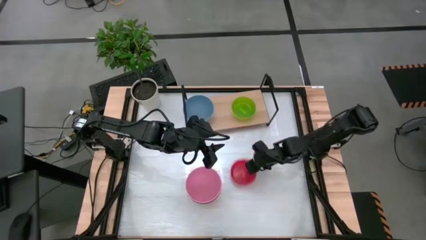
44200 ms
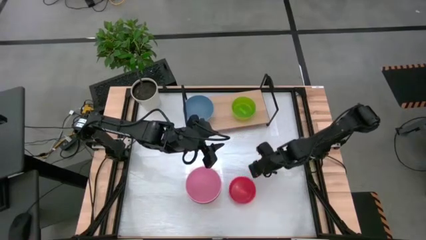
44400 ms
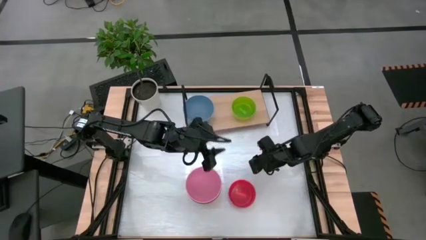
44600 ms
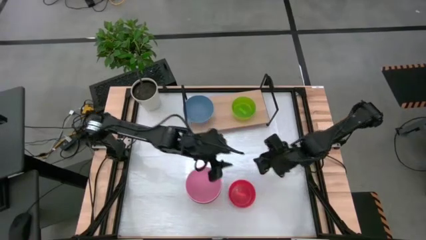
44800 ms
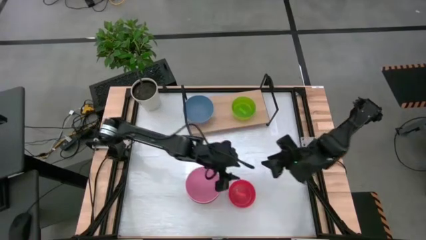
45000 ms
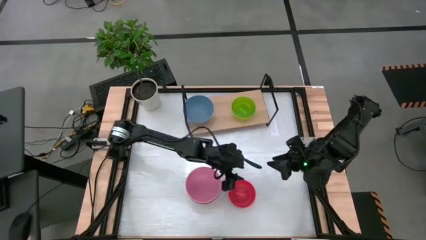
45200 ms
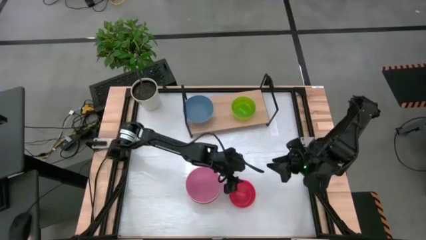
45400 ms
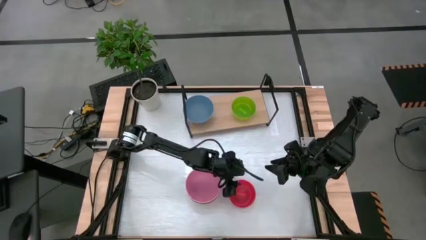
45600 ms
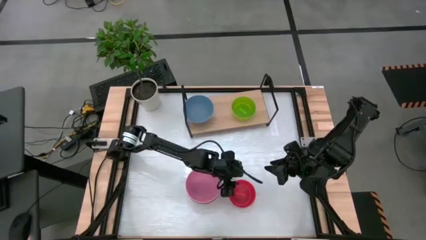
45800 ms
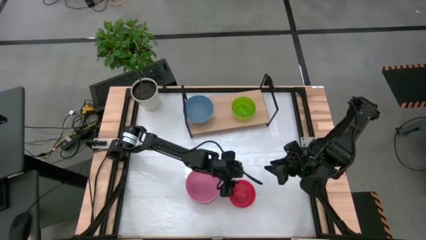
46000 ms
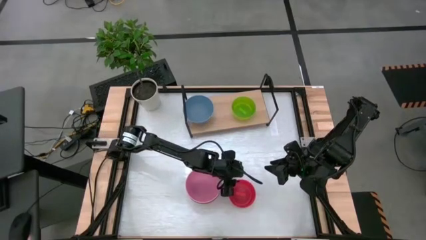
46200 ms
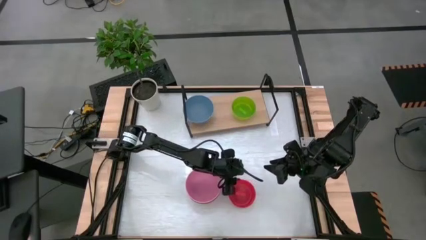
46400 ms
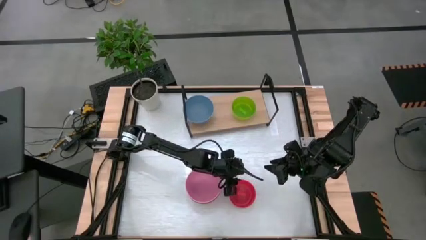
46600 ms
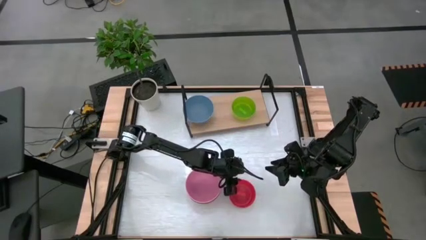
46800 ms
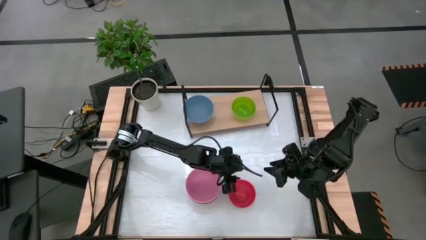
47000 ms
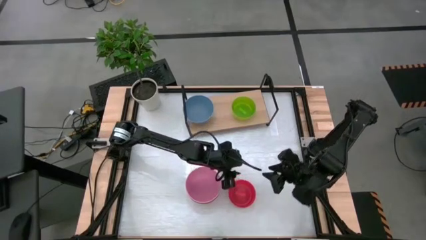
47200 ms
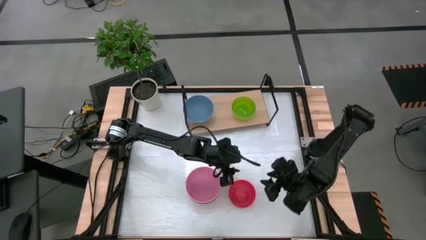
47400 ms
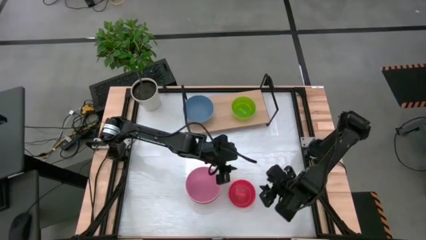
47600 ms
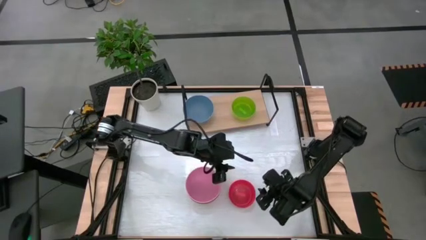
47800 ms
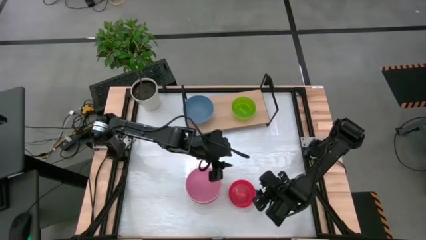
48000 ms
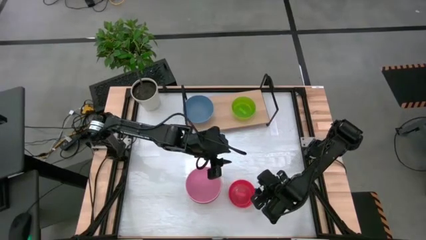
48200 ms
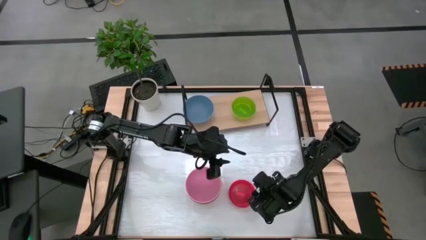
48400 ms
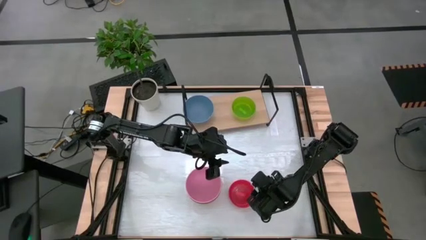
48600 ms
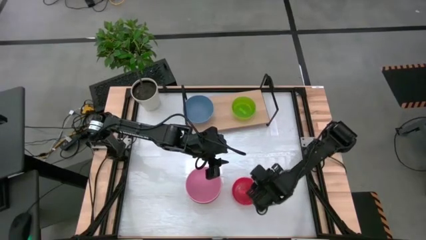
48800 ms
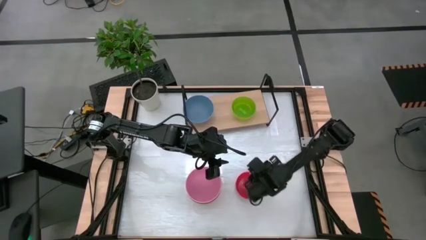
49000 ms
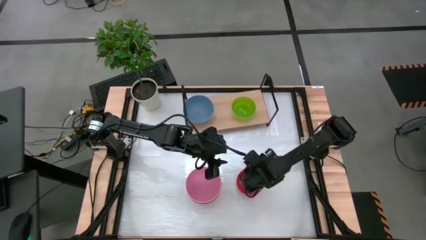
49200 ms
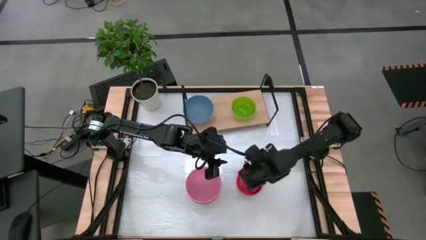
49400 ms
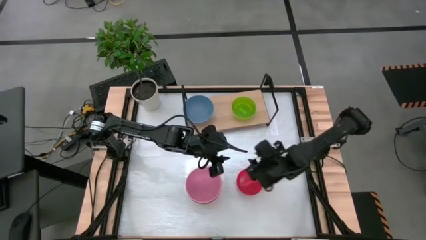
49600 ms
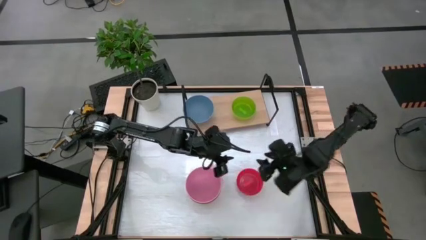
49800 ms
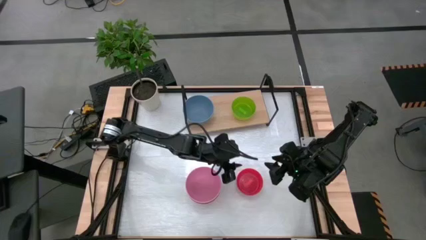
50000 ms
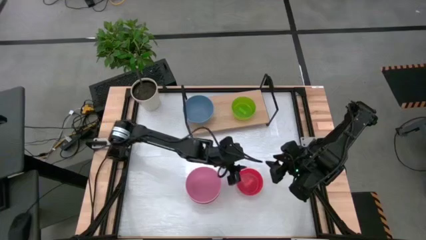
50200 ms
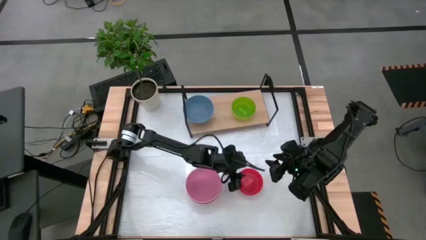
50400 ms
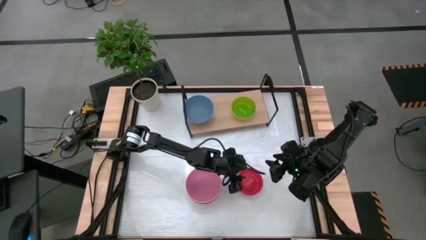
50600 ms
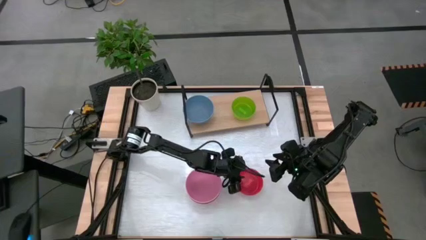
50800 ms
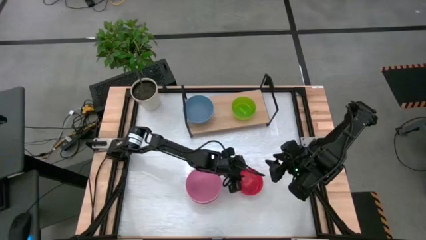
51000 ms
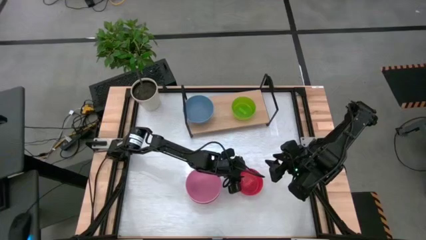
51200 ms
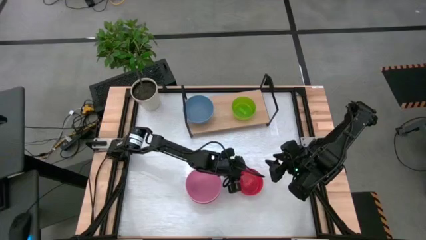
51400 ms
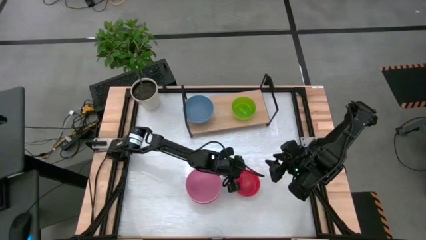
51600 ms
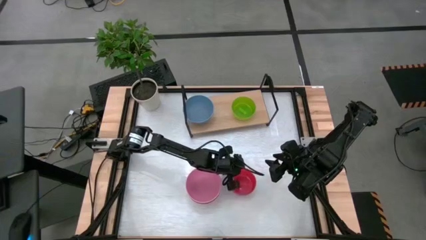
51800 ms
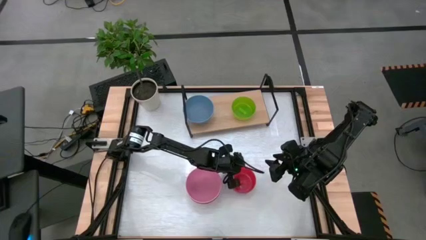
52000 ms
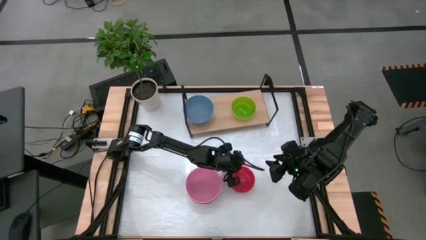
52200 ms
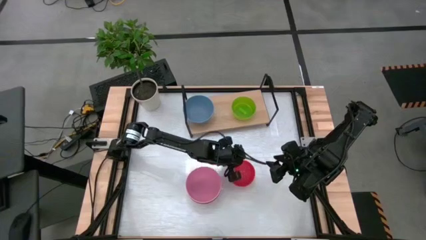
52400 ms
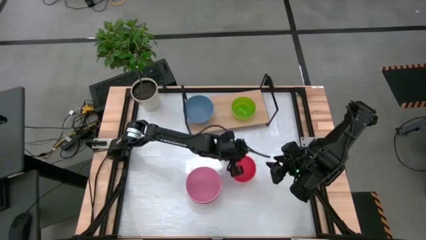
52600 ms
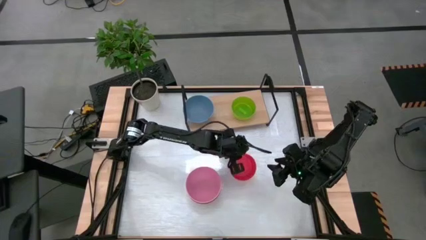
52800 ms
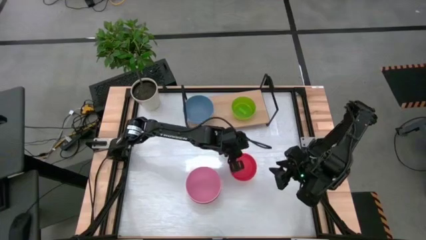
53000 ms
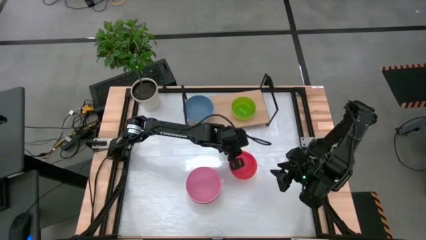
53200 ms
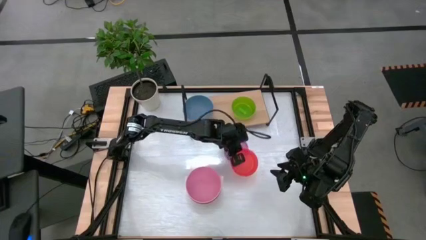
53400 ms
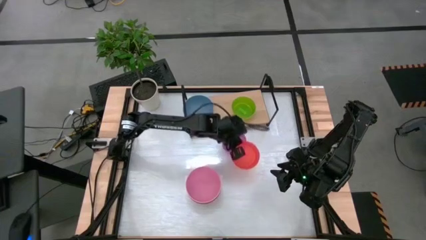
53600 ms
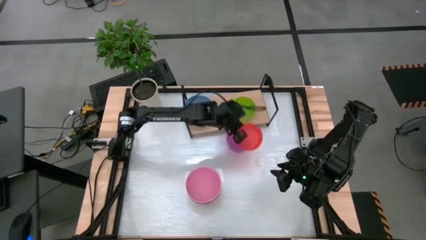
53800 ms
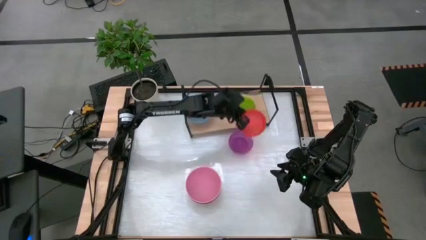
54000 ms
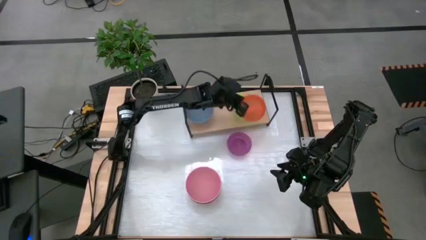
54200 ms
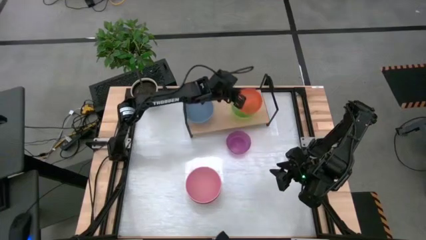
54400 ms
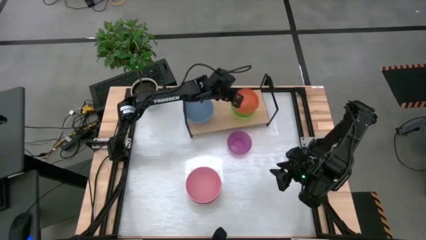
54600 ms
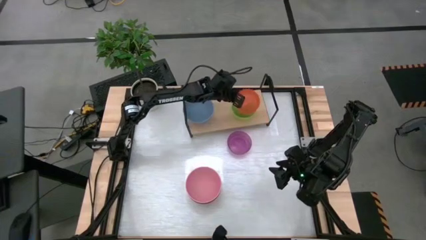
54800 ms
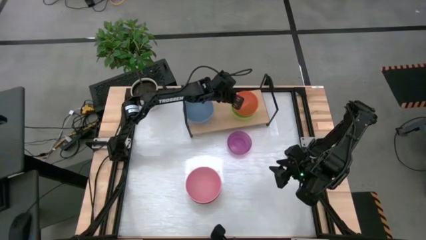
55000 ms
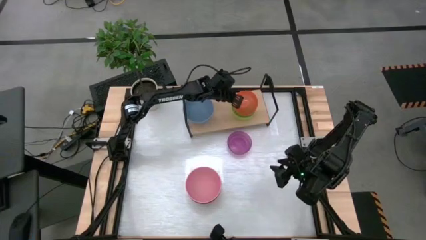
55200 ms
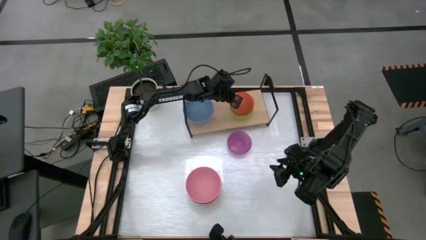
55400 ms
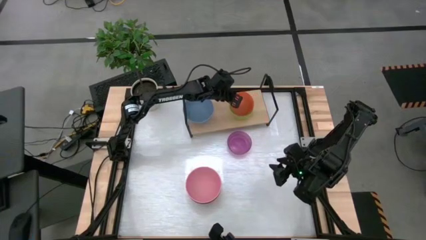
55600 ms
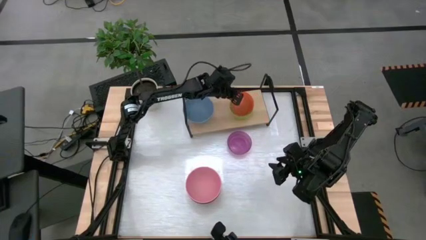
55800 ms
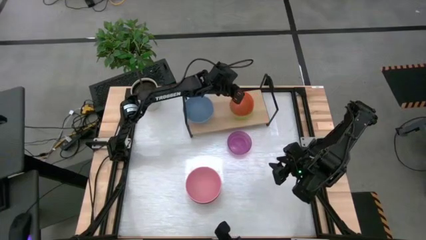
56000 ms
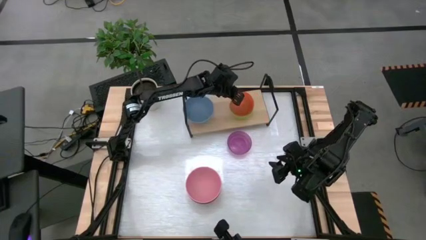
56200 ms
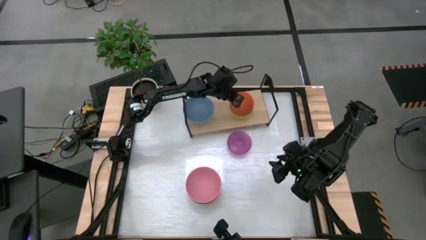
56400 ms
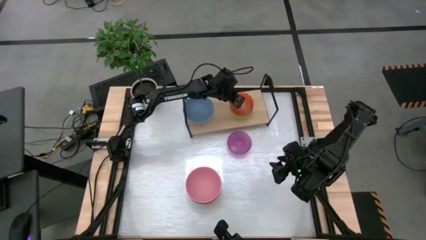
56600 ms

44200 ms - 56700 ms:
Task: Place and stack bowls onto a shelf
Stack the small orange bowl on top of the small green bowl on the shelf

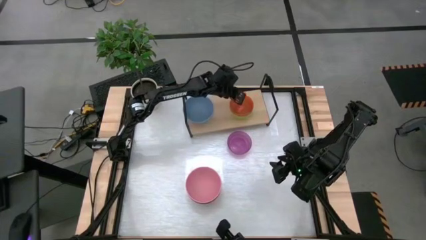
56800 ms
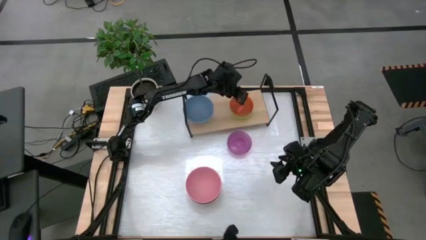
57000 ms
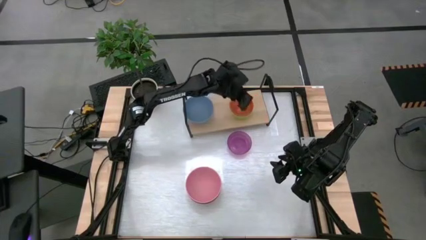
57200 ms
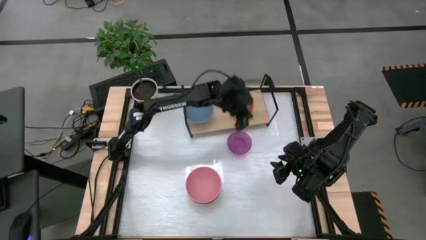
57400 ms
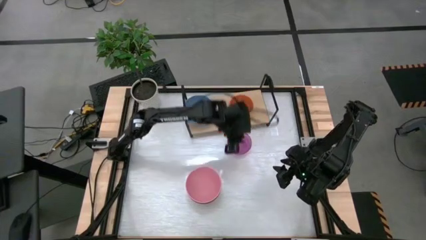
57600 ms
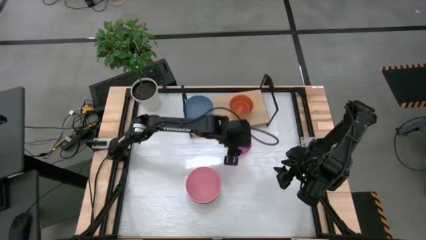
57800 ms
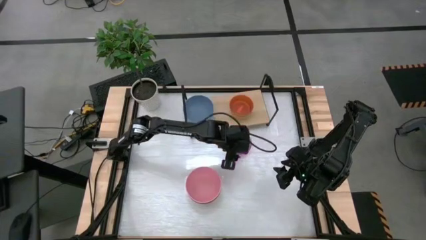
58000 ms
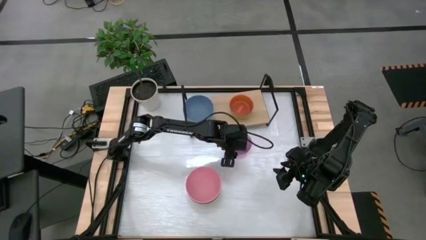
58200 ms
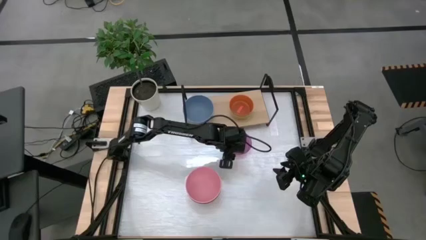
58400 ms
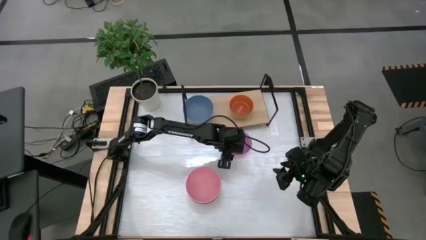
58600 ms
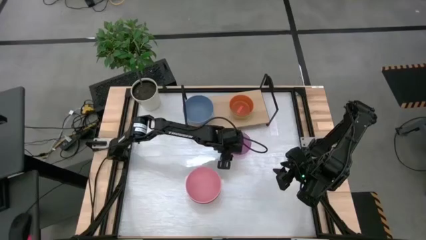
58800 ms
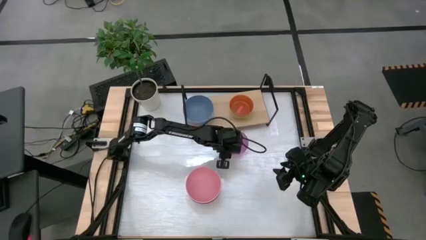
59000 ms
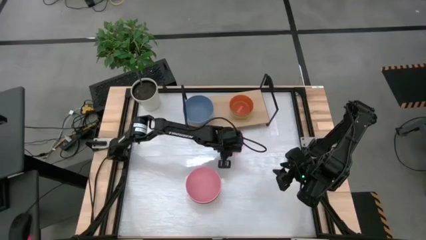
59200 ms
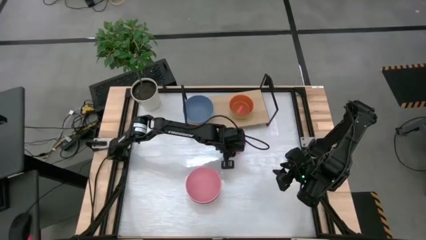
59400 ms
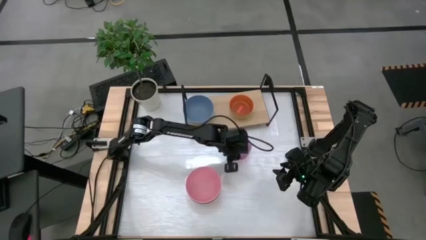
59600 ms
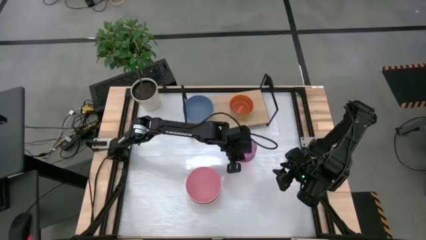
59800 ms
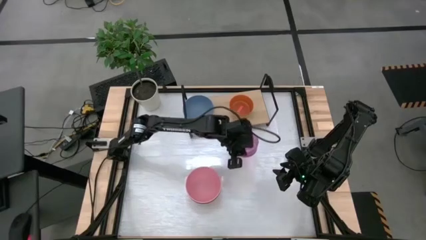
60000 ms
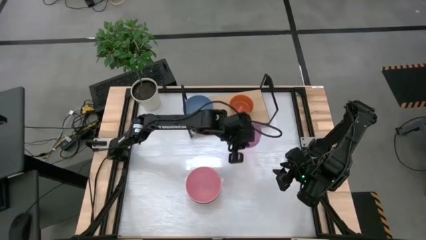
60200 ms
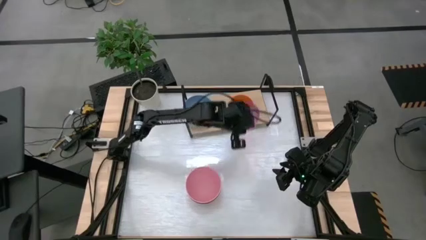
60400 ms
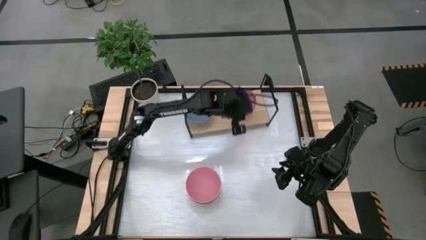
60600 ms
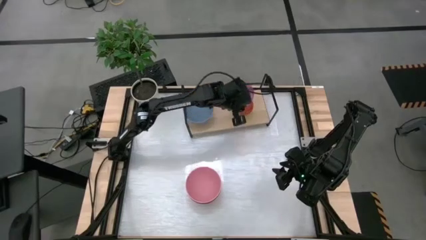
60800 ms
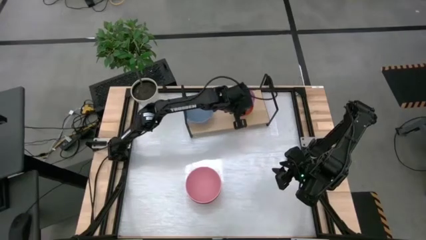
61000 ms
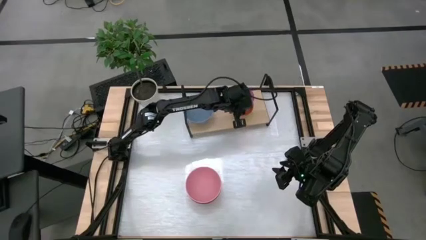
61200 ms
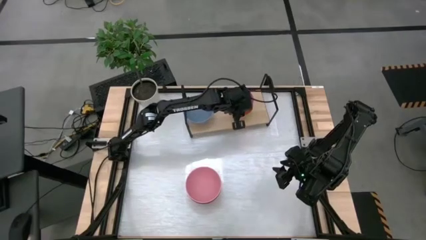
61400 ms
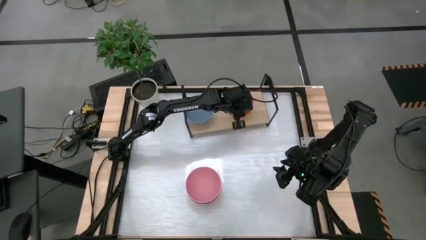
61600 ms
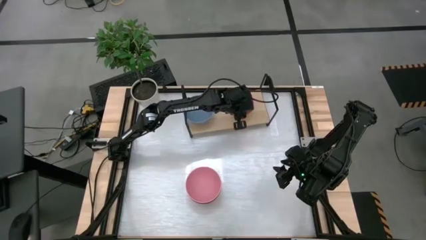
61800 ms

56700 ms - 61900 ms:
Stack the small violet bowl on top of the small orange bowl on the shelf
